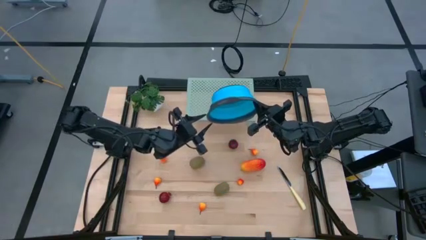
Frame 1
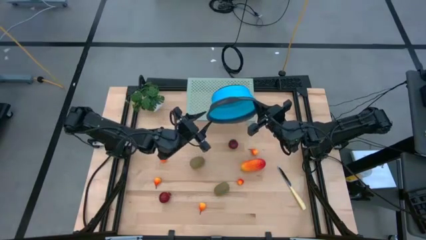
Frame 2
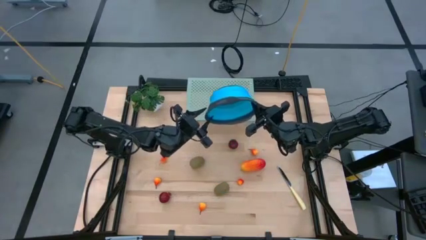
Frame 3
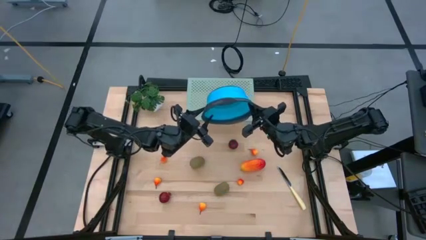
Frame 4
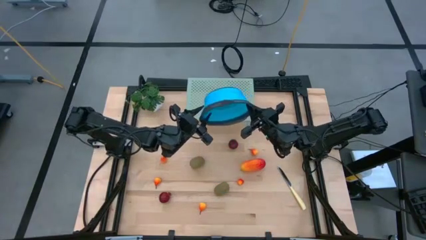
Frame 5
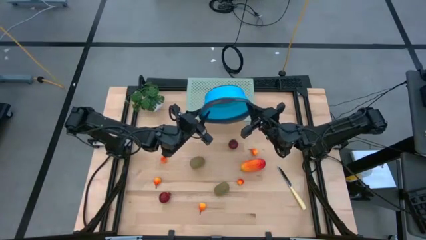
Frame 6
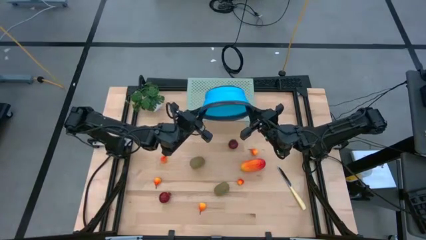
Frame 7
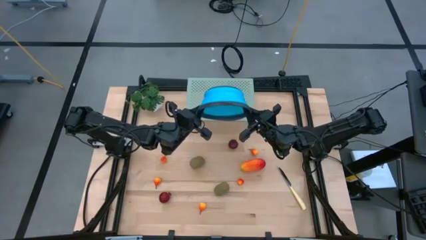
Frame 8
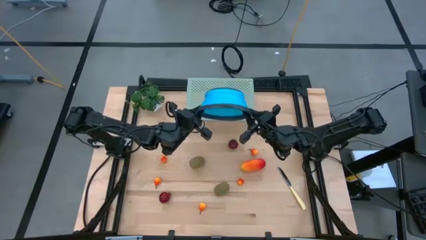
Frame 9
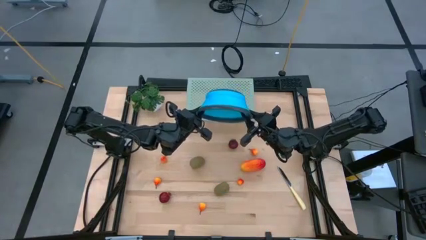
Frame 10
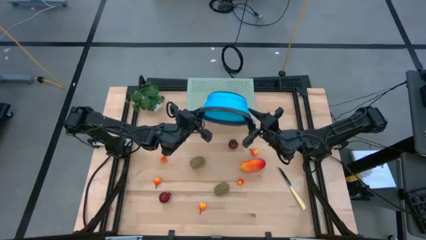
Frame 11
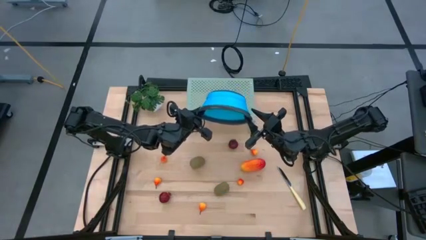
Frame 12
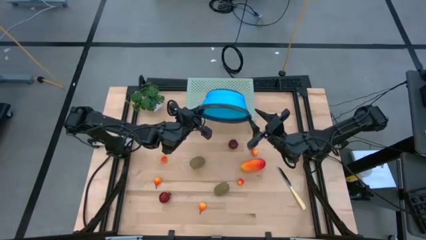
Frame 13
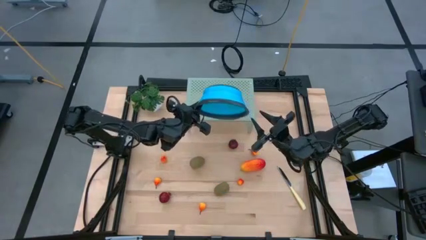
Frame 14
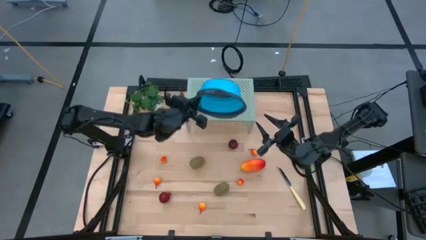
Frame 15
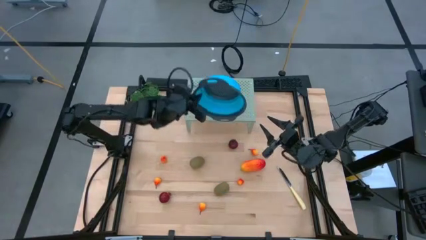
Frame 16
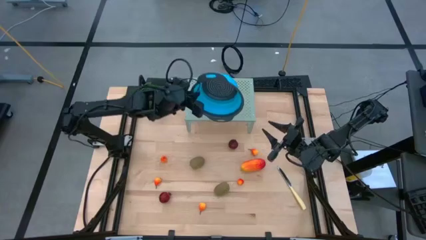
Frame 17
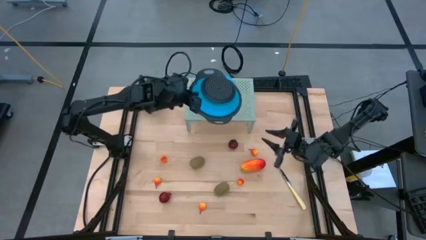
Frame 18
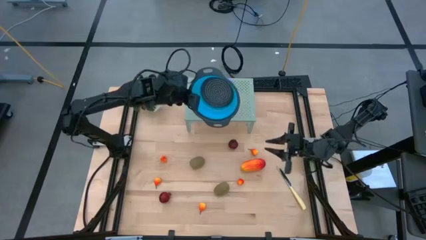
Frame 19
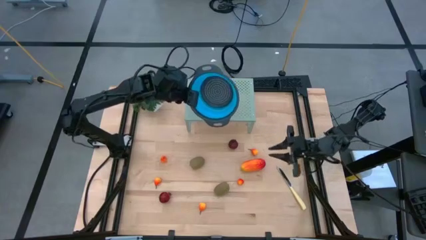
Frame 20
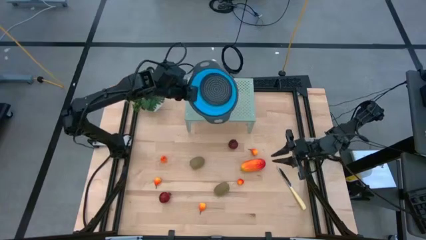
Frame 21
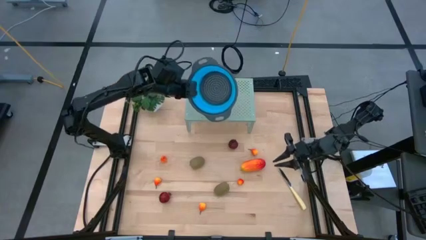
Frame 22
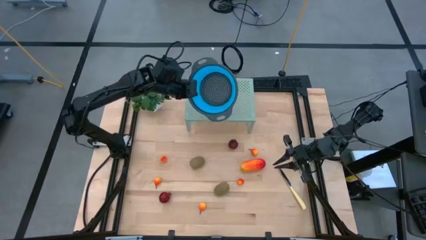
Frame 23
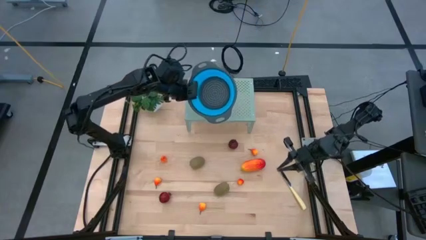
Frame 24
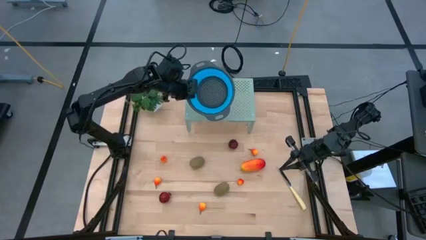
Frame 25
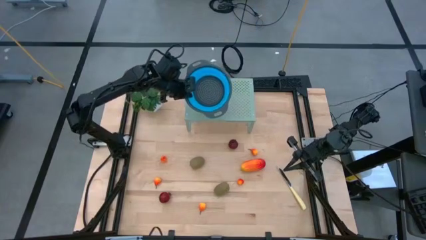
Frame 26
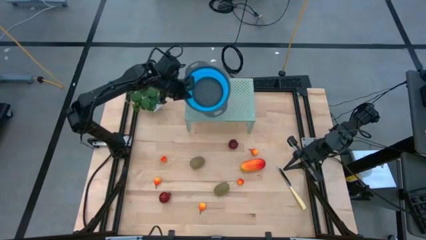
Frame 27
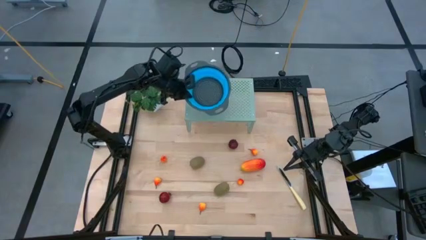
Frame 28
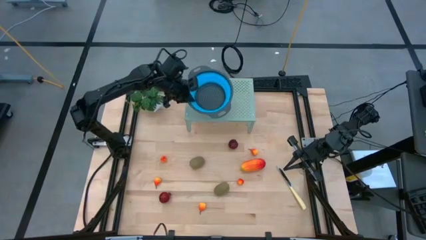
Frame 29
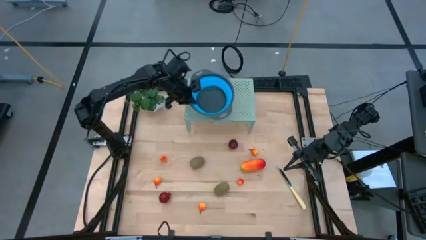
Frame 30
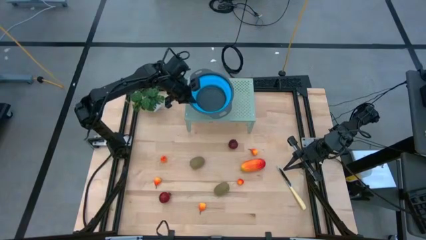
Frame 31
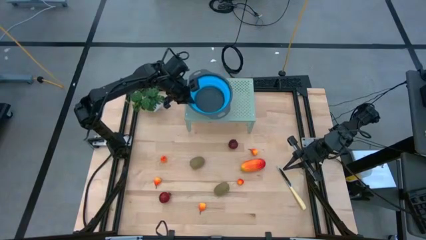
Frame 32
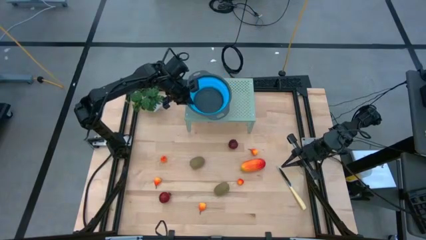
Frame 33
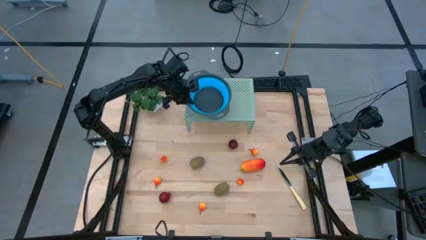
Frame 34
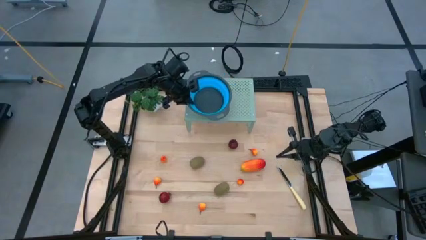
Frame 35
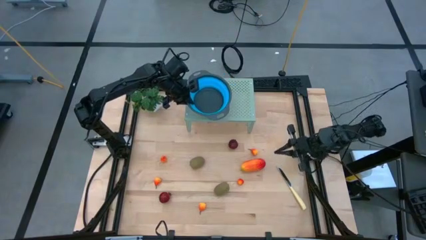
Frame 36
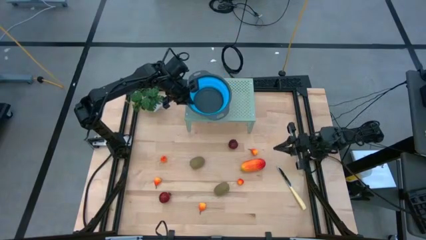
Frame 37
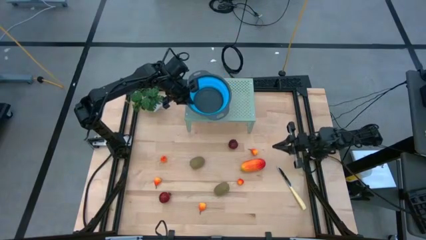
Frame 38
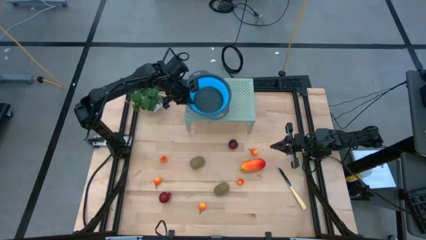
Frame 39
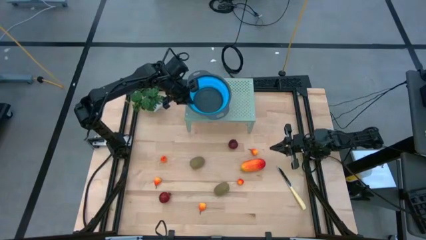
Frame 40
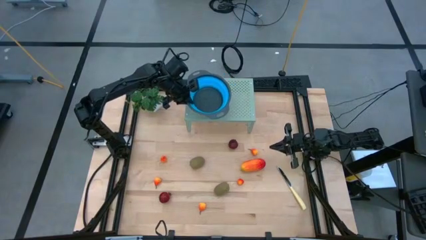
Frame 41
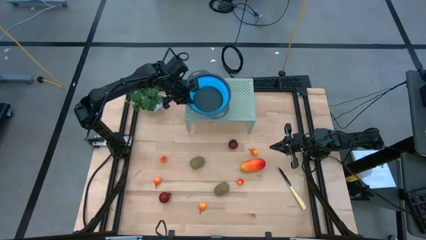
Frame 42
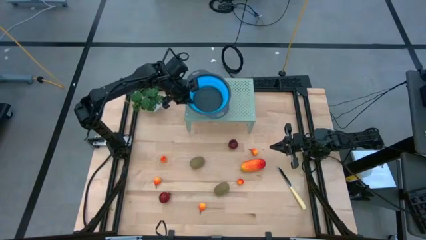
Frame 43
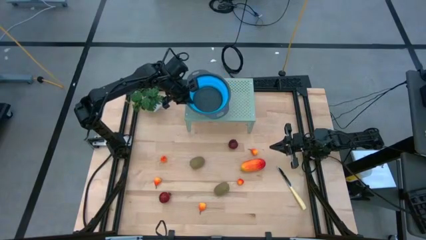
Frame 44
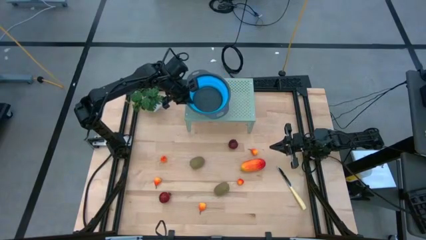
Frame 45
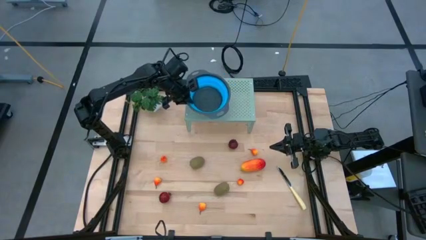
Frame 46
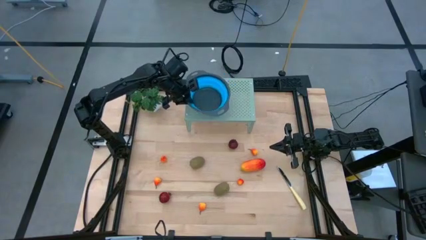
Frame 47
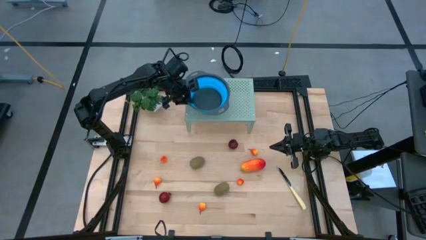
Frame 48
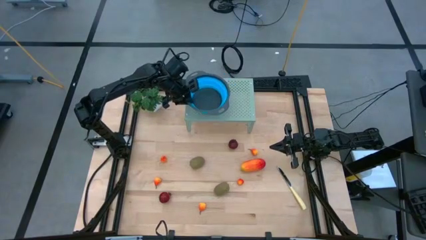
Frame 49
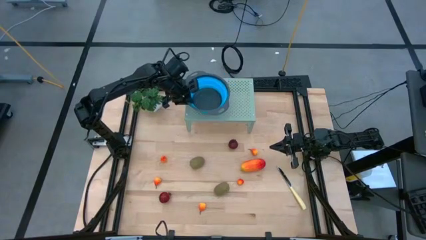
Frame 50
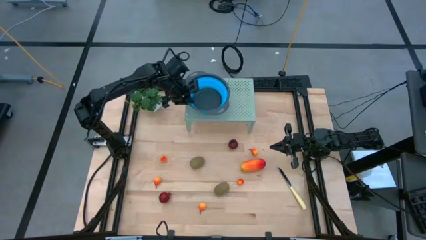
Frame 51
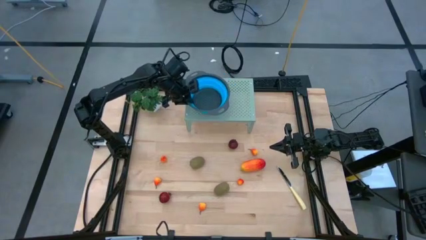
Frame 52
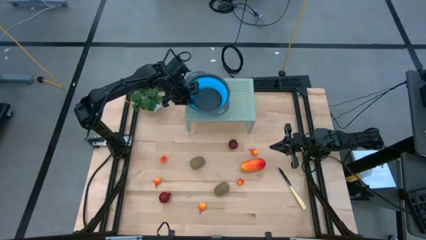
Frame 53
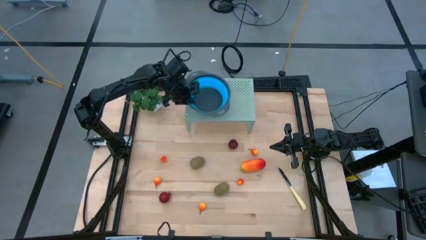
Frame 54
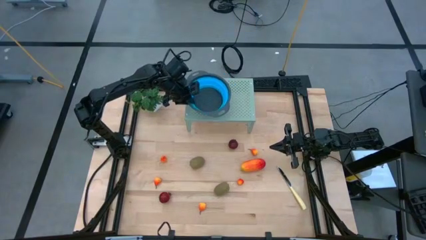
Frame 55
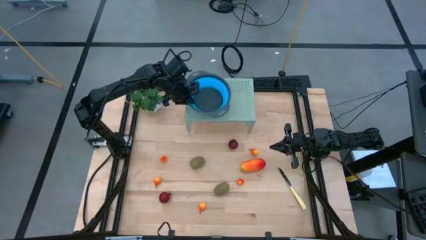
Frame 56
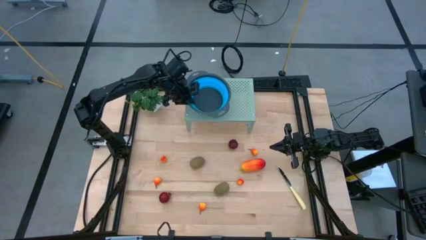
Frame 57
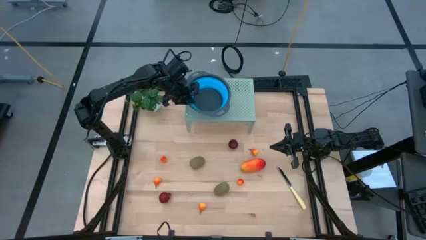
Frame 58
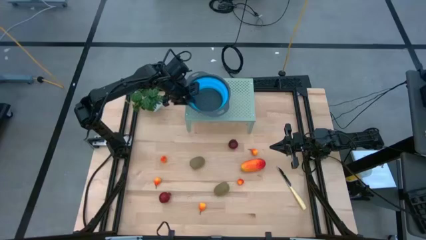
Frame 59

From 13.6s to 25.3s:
Task: Pick & Place Fruit
Put the blue bowl on the shelf
